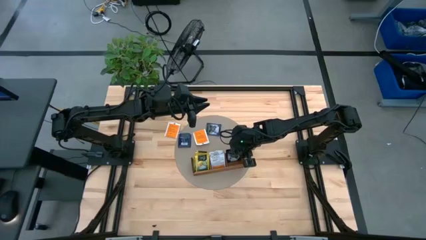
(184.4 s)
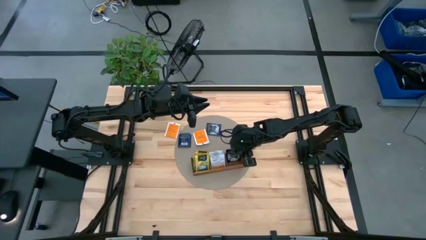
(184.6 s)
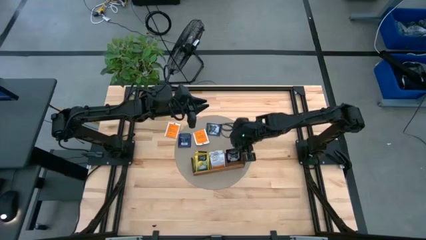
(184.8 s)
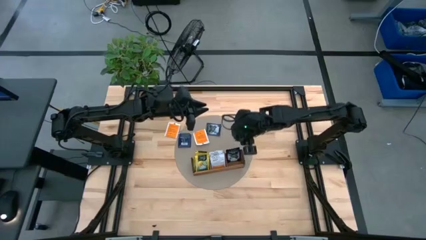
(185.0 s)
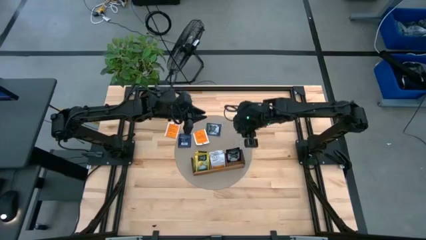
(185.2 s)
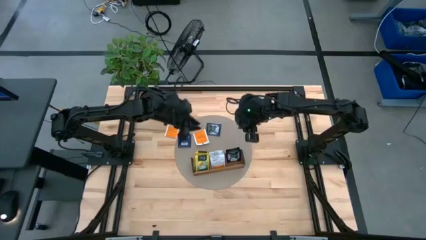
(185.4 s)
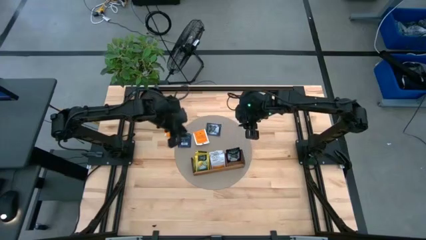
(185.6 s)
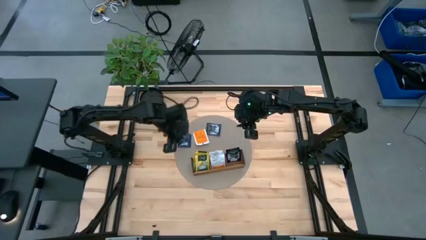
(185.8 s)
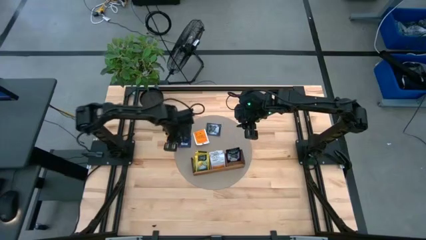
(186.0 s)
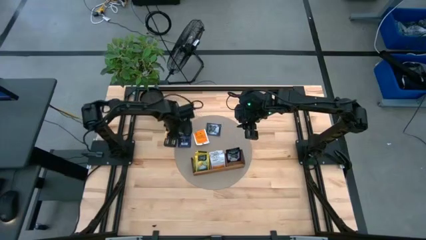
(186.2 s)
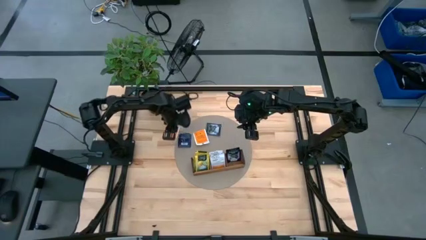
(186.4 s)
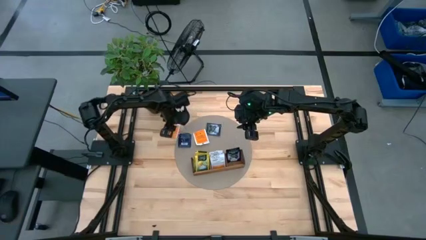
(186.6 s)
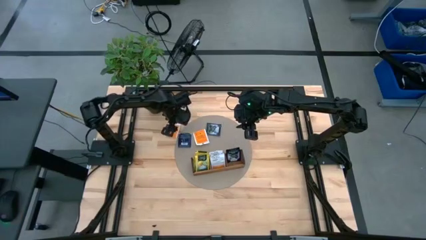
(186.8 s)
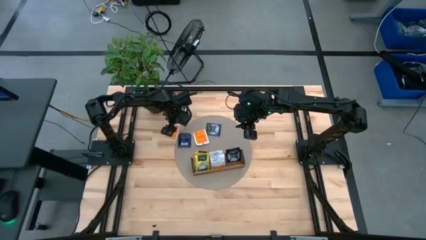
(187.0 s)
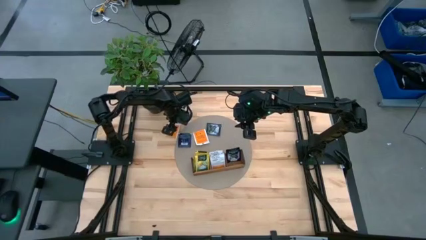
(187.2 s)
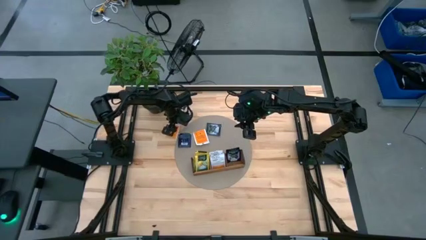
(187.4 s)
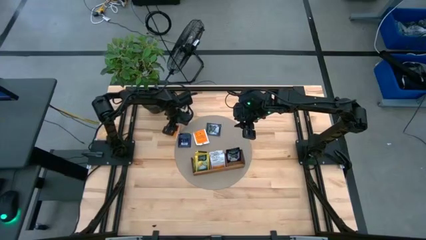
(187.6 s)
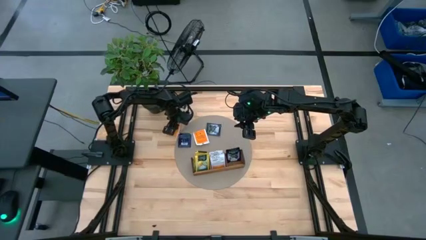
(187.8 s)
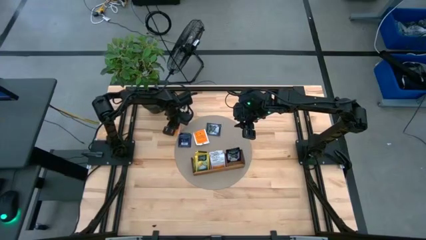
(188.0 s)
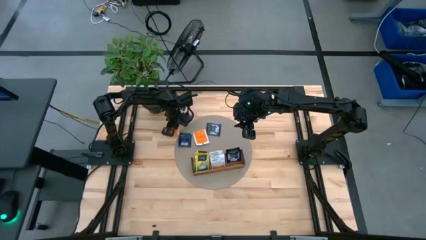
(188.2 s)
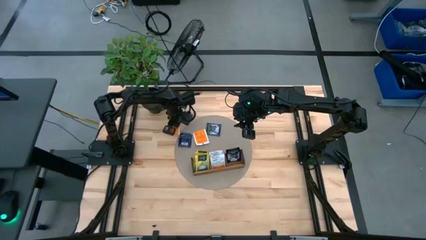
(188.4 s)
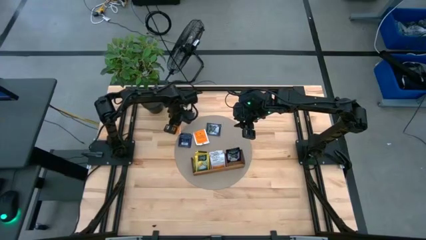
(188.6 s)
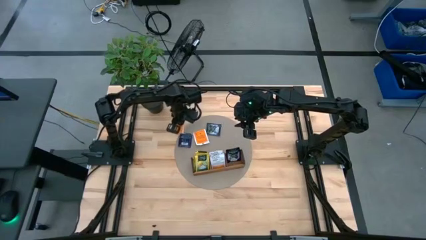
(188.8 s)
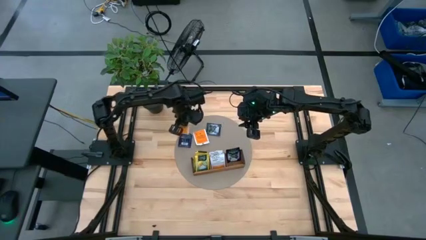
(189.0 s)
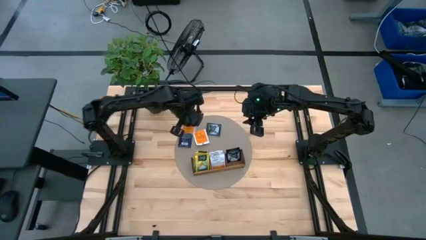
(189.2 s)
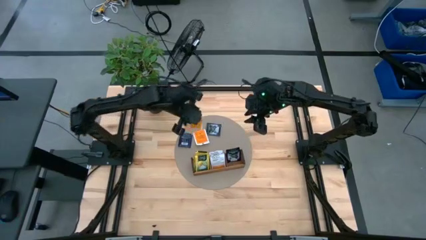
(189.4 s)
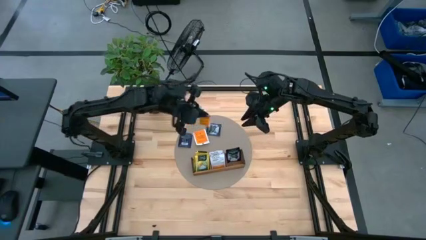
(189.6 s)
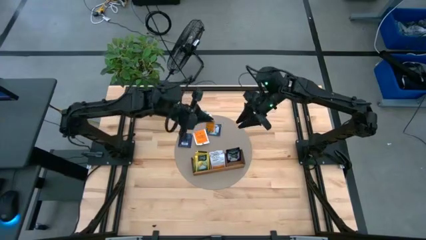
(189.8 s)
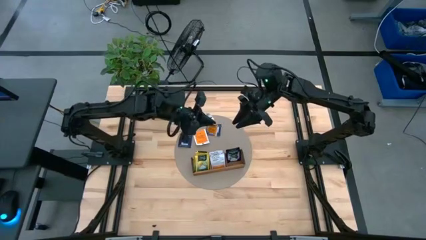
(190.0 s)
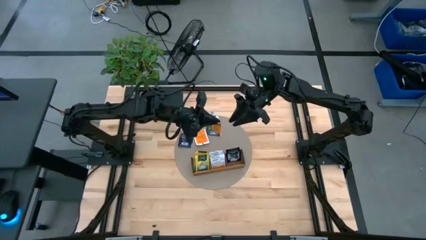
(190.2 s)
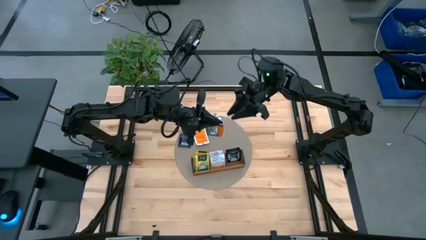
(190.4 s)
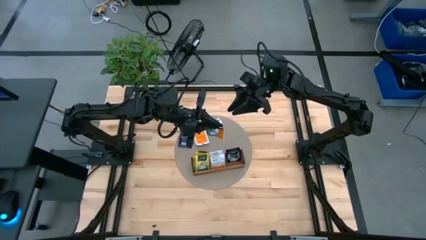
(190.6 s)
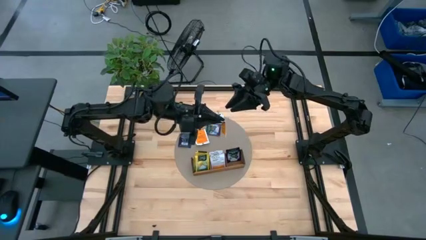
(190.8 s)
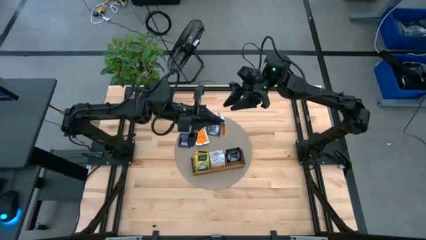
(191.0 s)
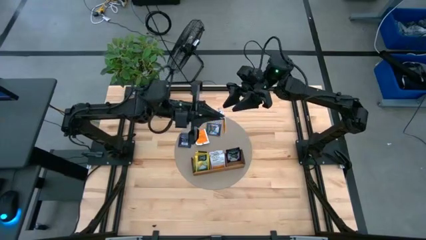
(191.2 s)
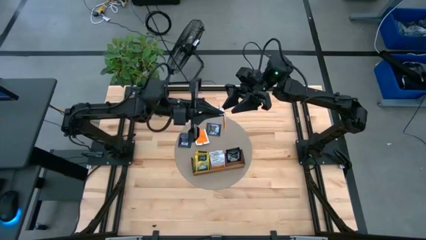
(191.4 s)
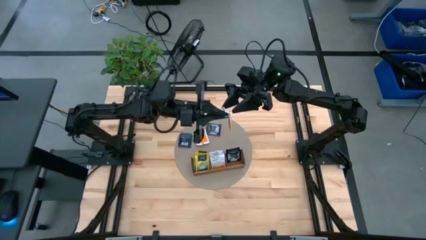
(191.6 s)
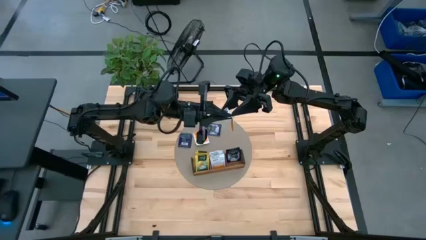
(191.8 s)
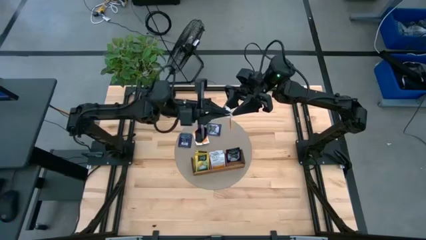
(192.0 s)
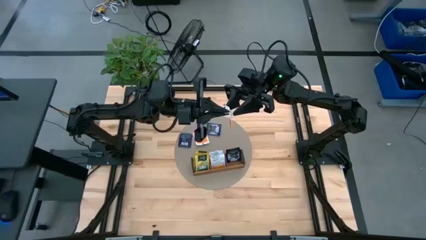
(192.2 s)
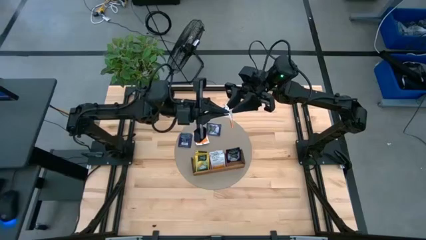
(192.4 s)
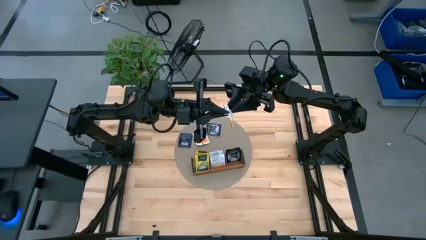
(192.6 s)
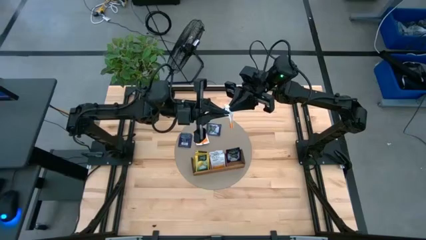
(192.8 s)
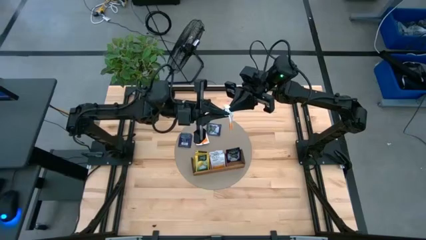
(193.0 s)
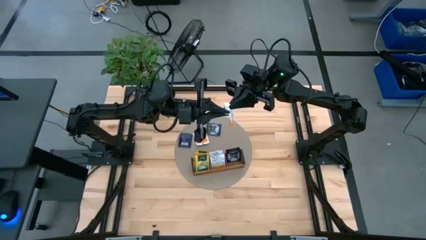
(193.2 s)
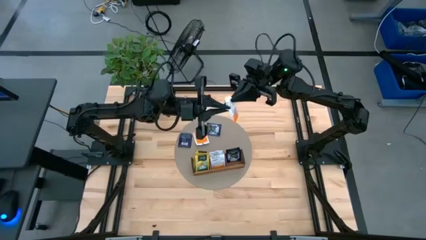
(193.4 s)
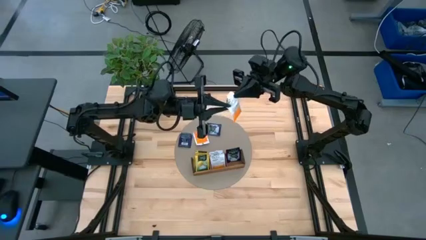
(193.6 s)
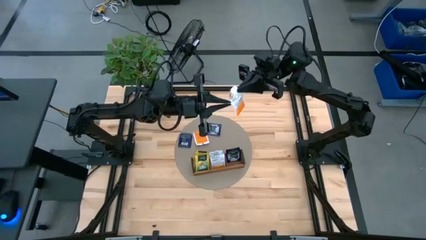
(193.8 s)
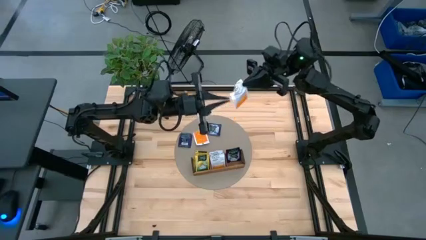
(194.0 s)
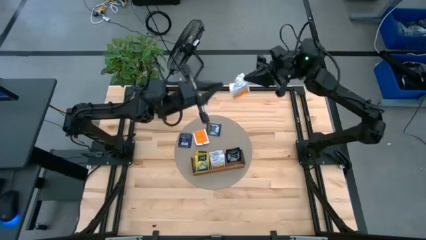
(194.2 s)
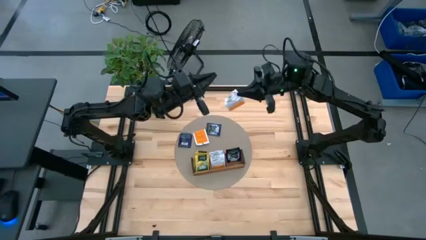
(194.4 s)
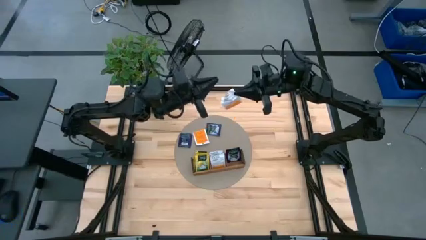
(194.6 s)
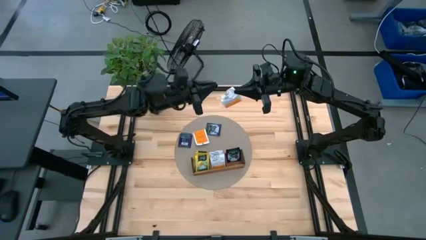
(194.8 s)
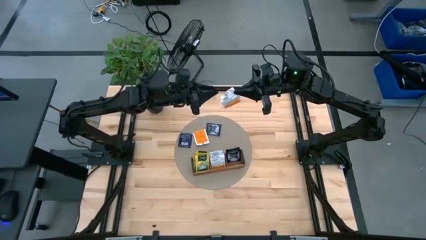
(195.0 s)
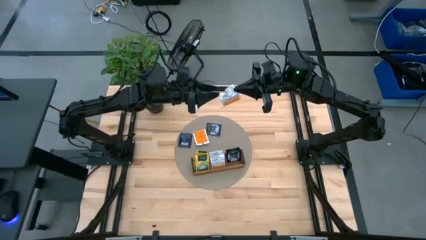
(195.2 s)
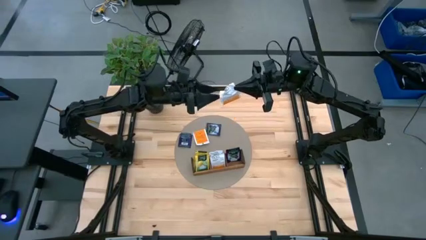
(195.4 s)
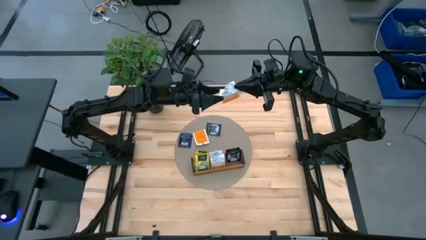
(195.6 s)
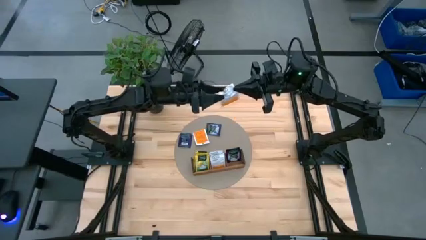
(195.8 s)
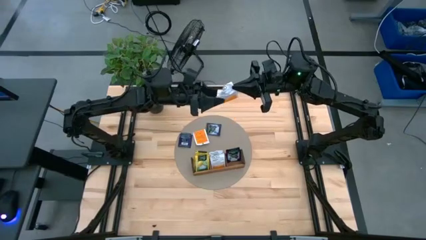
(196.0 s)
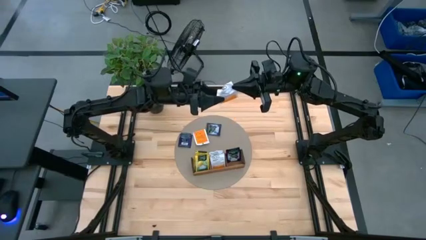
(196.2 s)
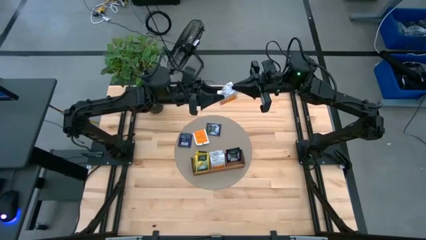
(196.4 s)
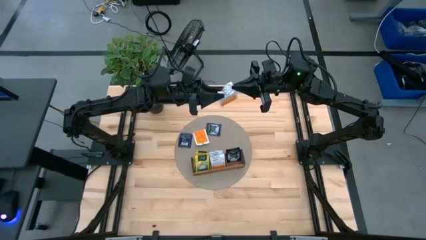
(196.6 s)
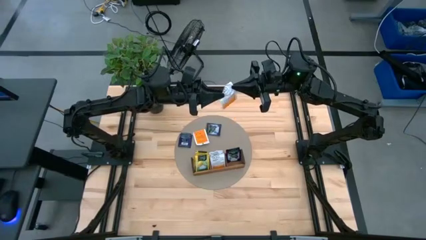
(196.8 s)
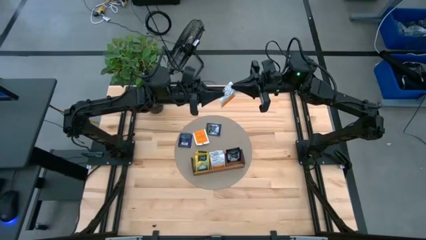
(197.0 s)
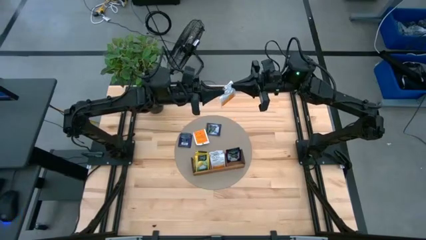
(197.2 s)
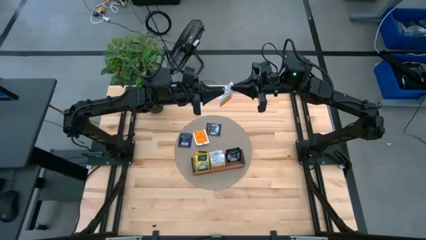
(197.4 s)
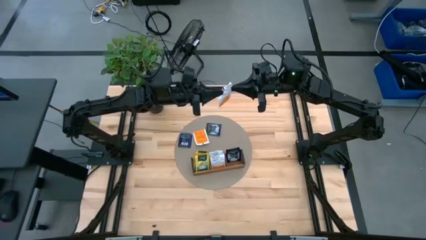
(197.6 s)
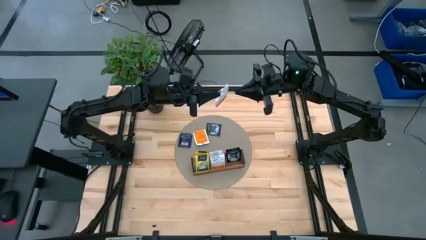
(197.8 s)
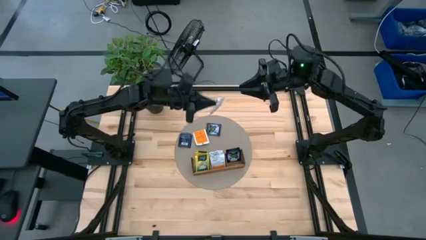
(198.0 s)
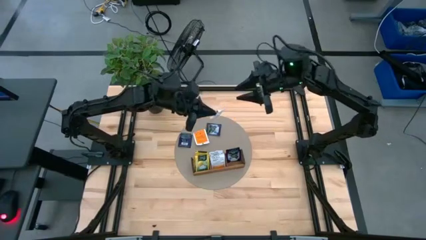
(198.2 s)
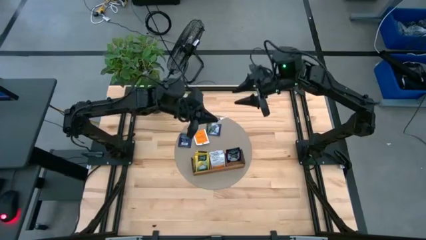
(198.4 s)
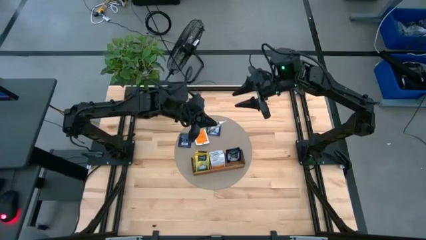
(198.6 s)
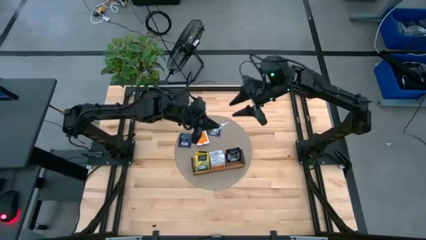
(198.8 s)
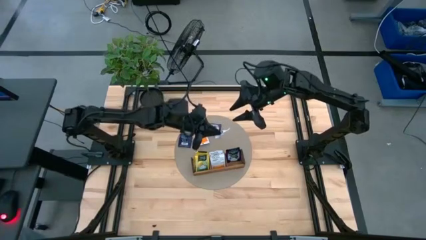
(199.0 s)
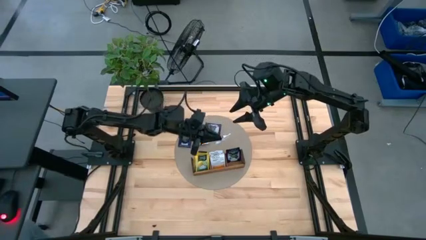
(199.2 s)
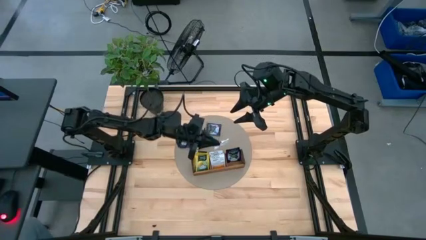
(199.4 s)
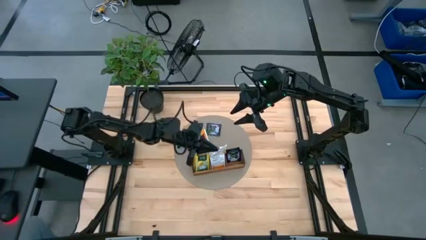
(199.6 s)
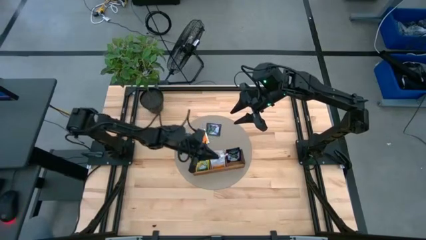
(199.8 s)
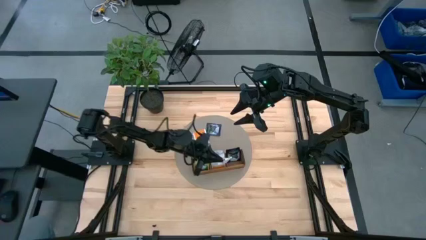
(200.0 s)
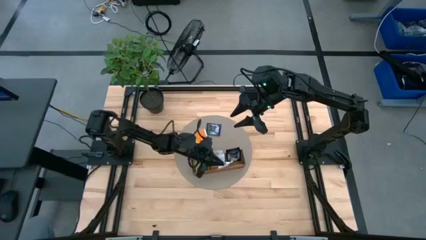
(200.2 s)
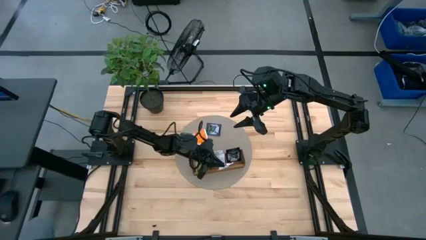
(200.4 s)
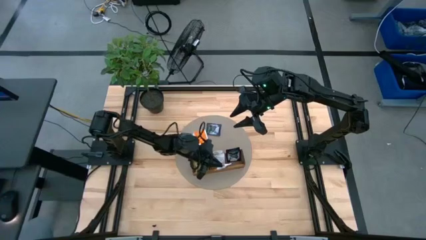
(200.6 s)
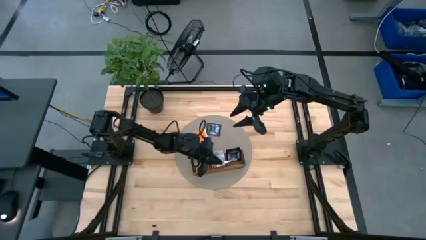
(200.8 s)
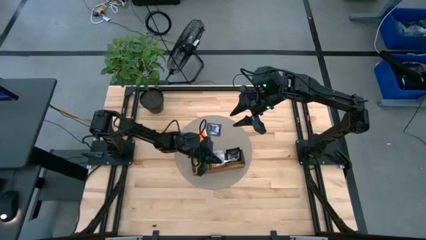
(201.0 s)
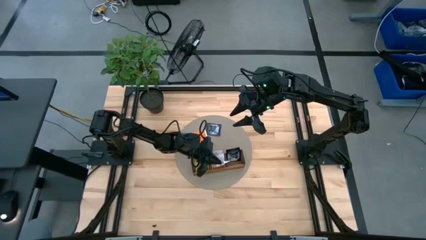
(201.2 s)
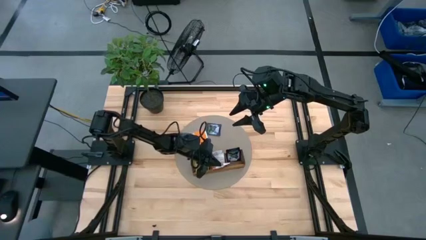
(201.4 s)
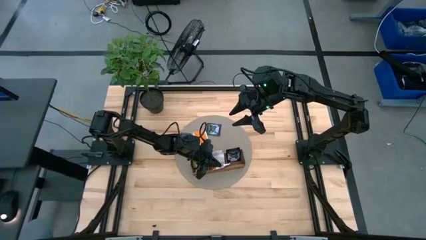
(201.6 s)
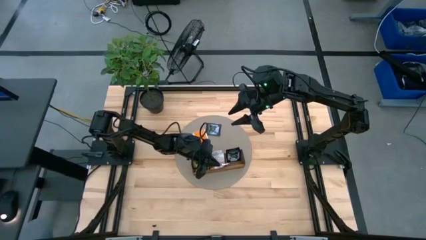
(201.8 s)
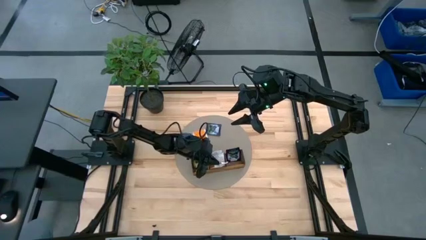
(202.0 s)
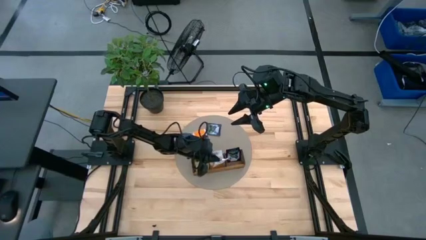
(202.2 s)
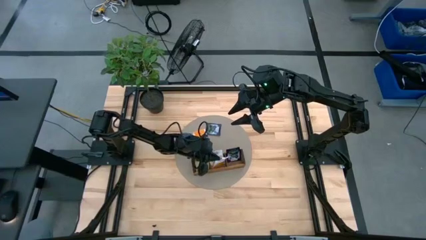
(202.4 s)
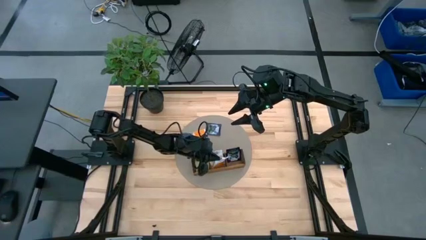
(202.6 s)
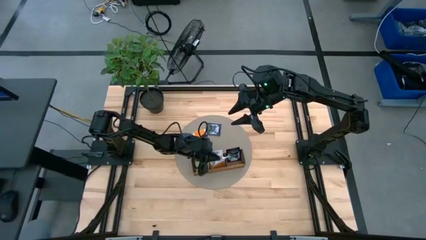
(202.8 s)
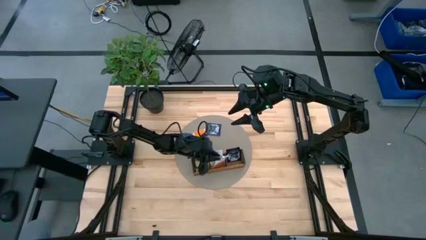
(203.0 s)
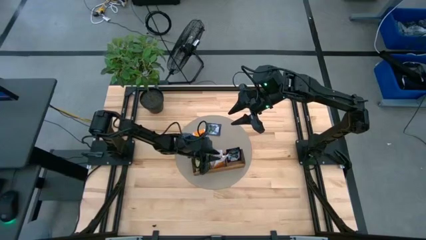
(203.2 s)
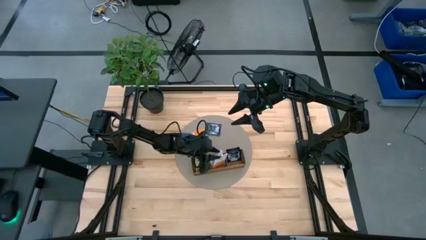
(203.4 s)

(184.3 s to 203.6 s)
Task: Pick & Place Tea
Put the orange tea bag into the middle section of the wooden organizer
